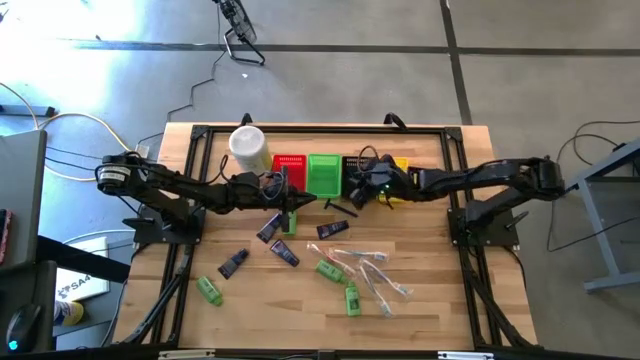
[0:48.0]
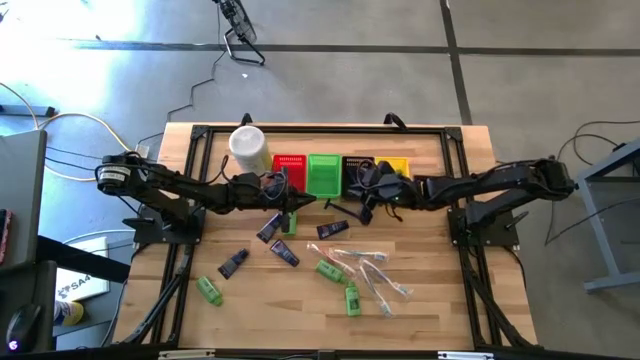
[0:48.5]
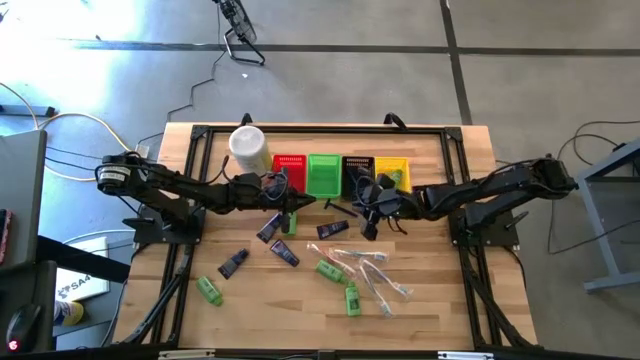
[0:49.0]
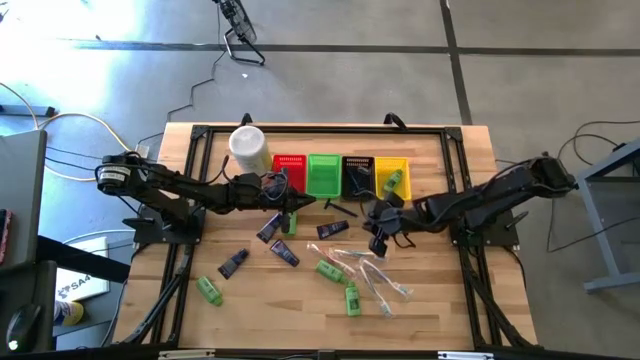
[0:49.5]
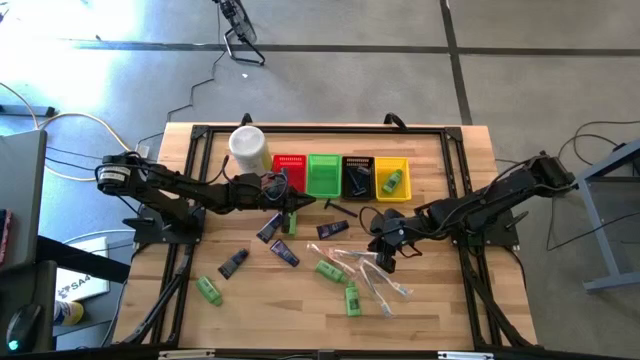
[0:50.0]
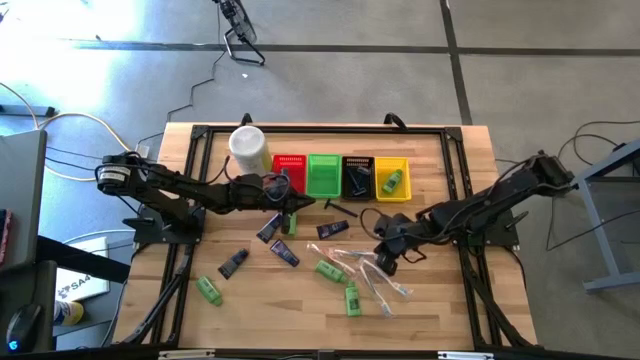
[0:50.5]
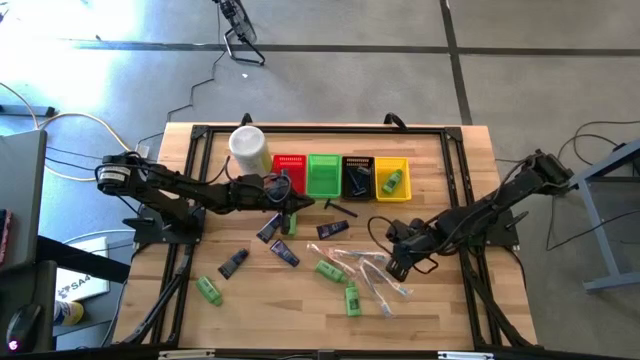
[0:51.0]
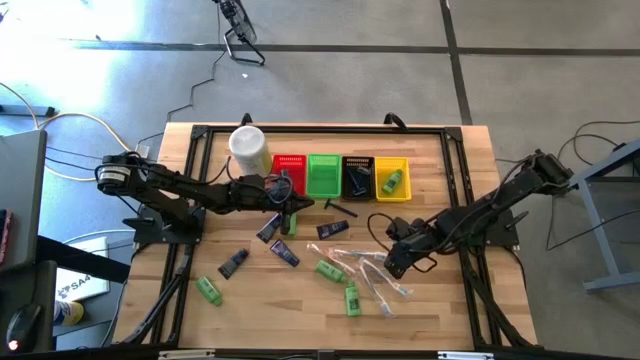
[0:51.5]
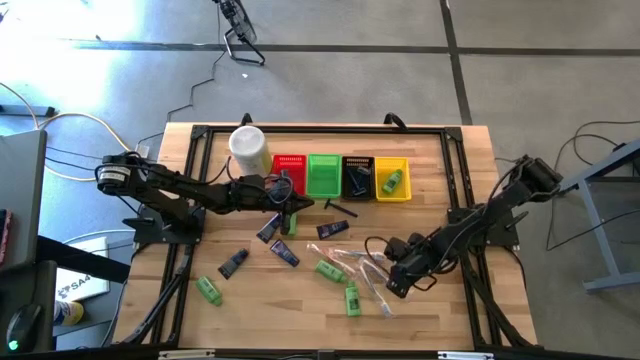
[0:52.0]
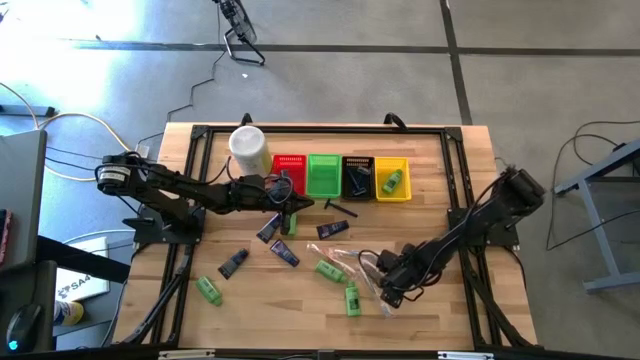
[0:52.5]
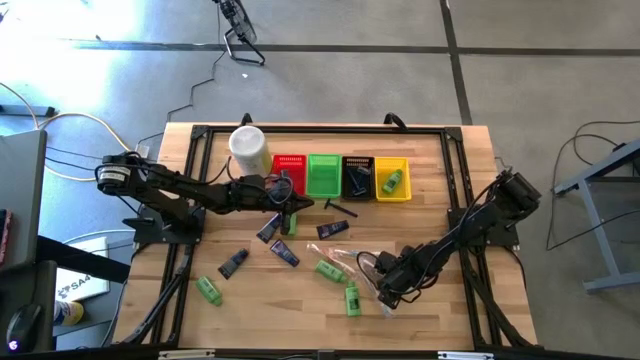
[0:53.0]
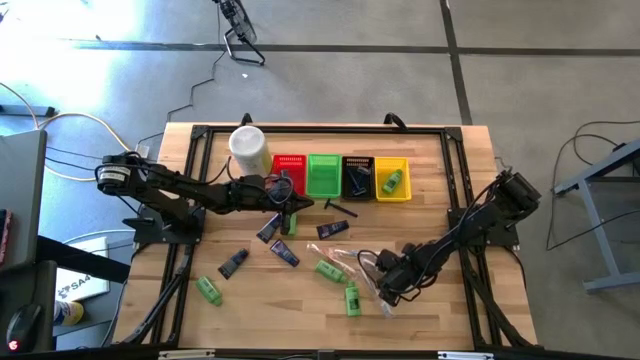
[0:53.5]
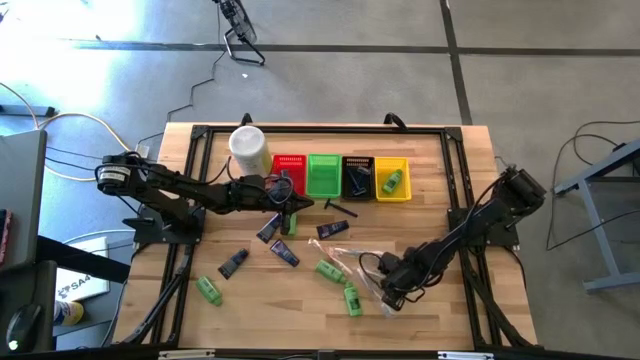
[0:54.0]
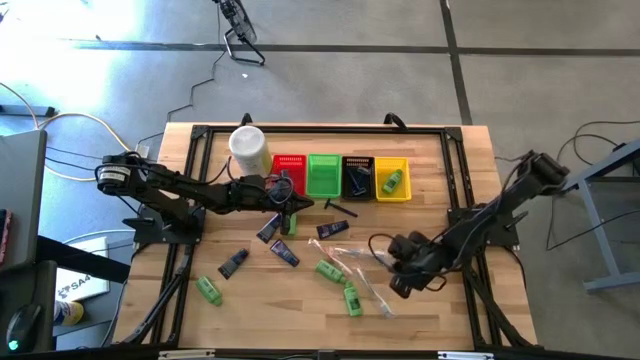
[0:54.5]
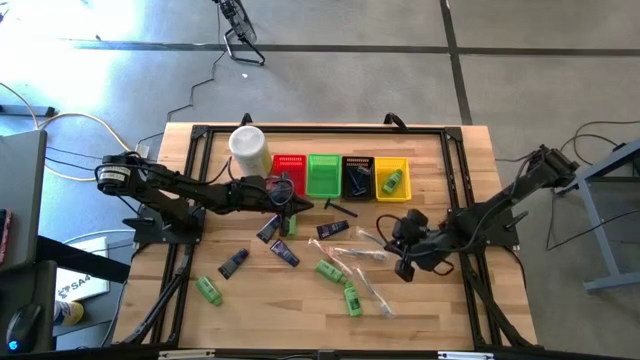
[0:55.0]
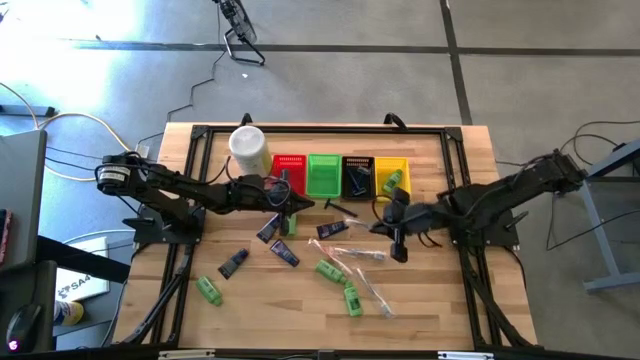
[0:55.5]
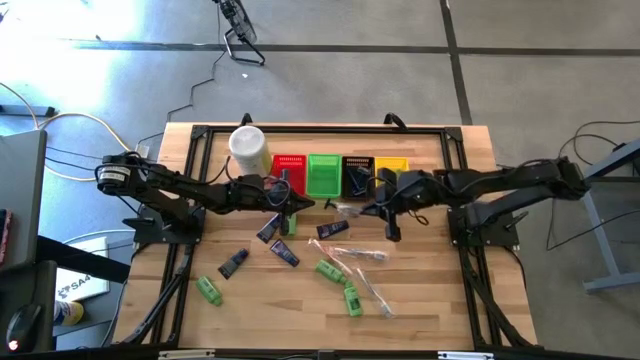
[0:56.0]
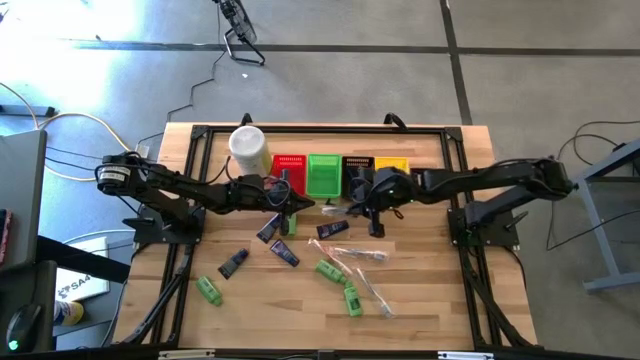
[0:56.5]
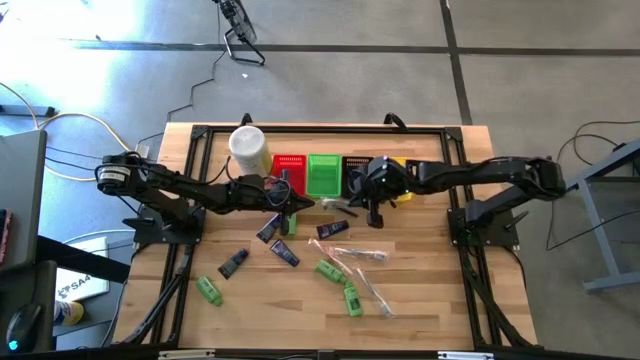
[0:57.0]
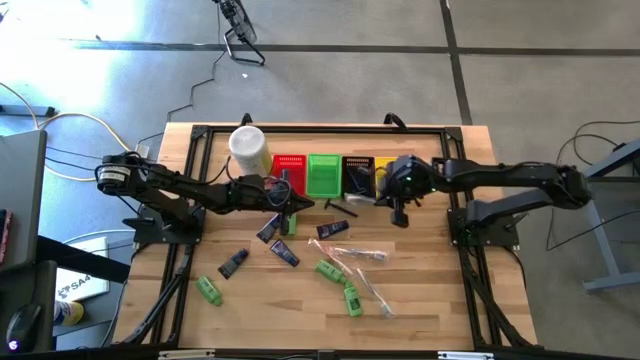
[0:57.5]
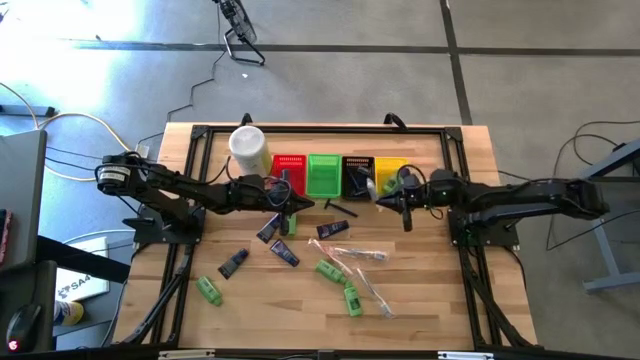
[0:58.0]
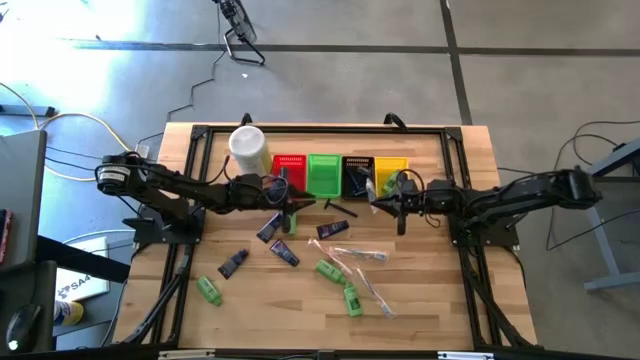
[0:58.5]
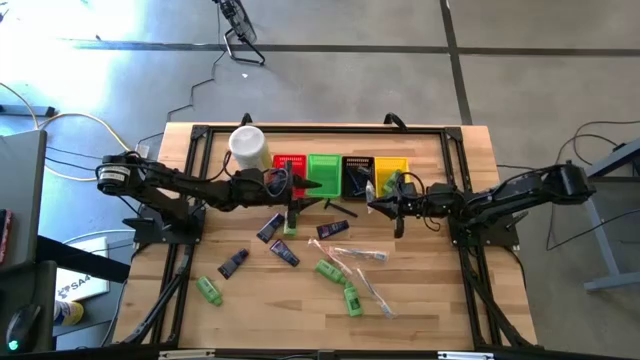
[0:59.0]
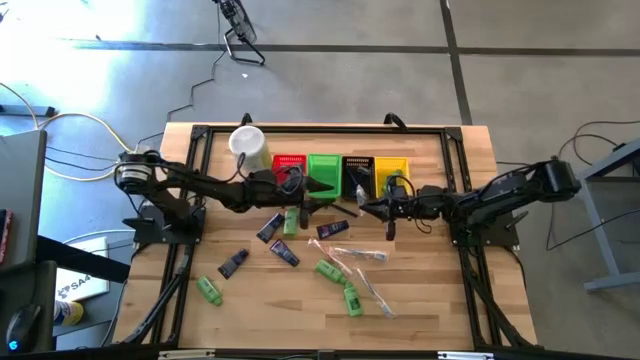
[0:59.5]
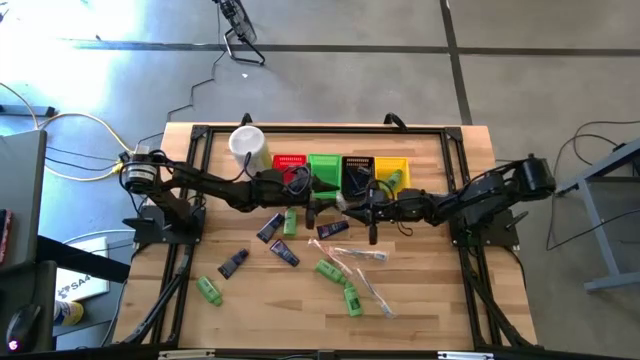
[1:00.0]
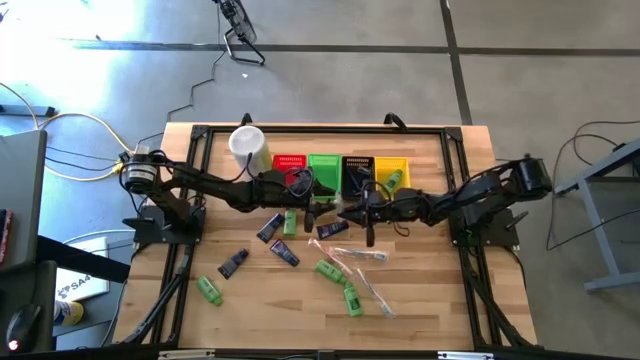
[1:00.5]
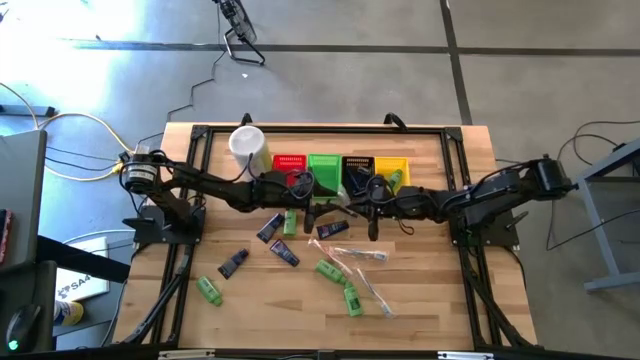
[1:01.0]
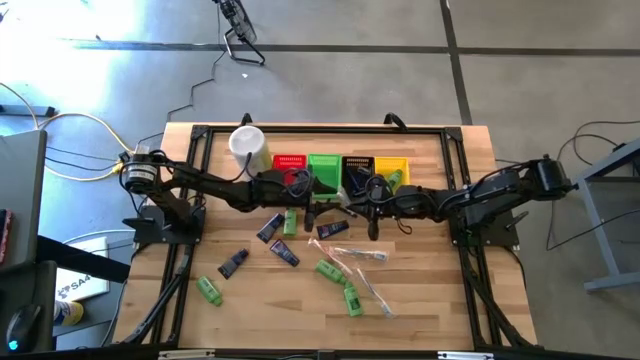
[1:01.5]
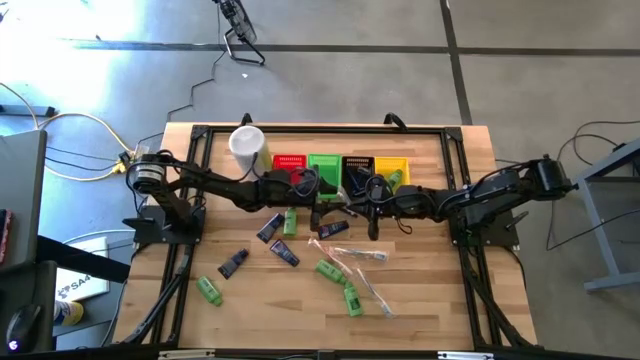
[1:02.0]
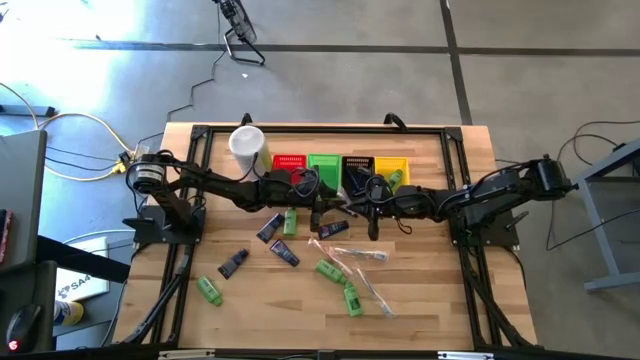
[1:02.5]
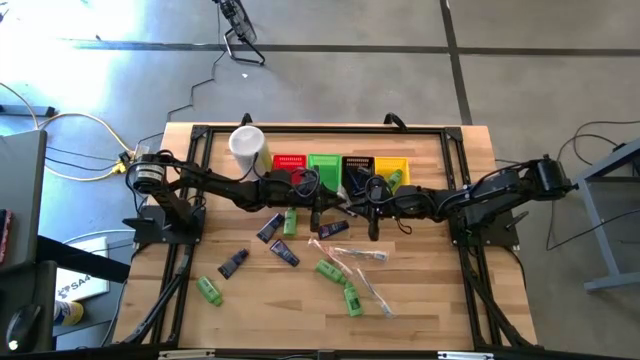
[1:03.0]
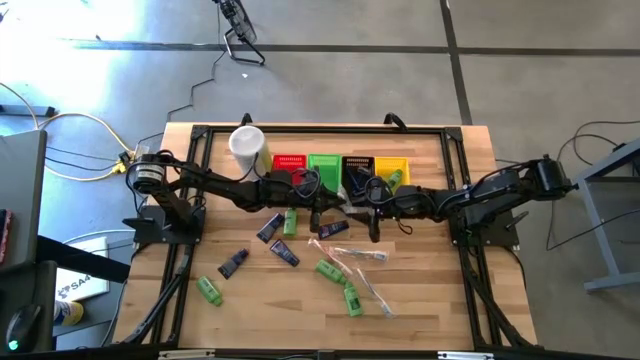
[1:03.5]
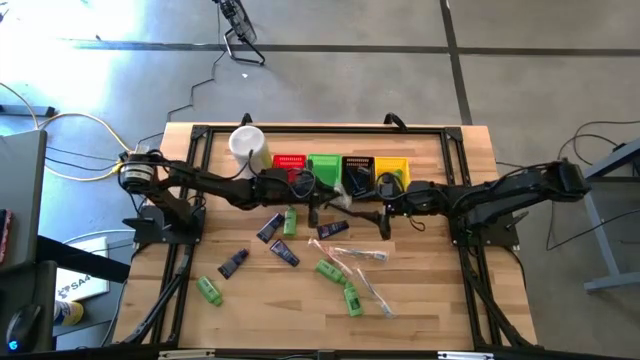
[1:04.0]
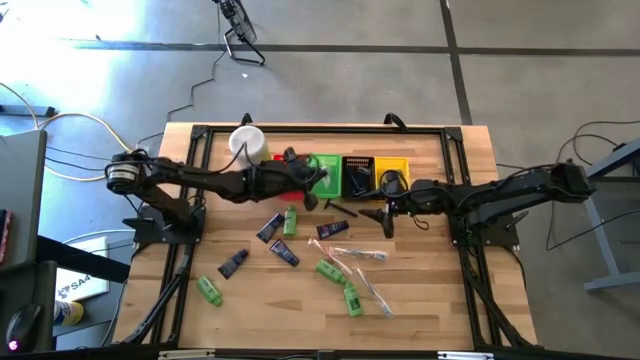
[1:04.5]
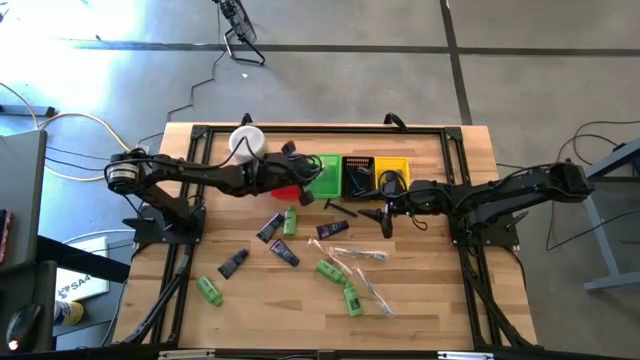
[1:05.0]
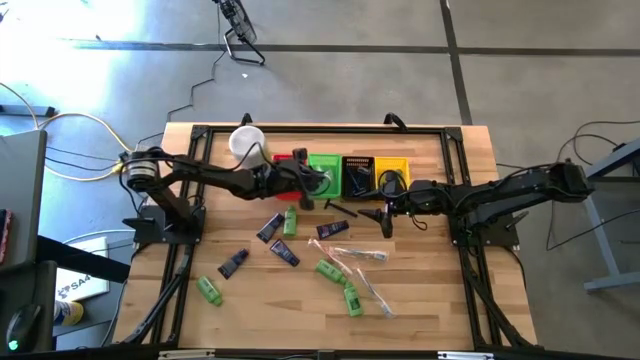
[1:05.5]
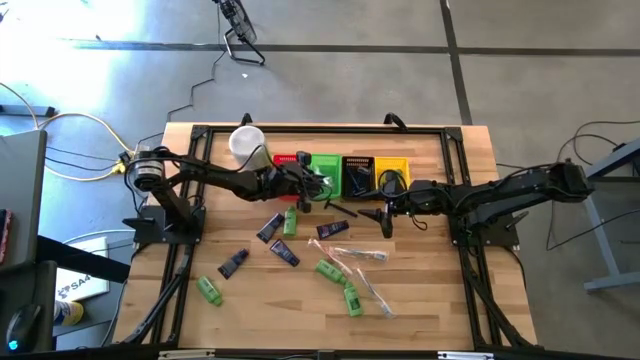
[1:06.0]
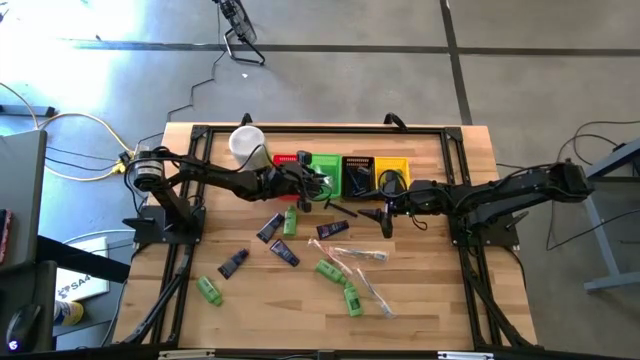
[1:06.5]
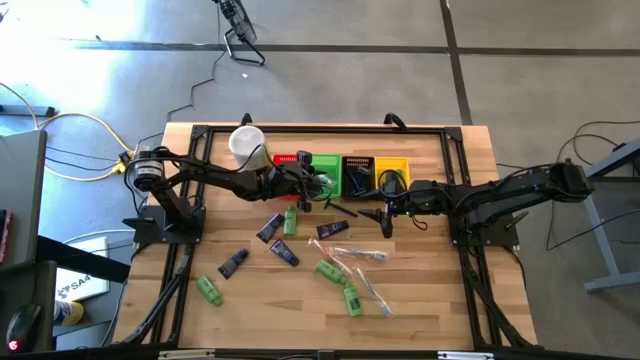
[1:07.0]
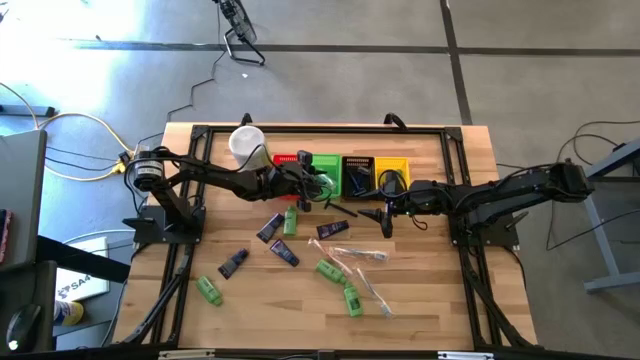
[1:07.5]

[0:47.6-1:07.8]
Task: Pick & Place Travel size toiletries
Put the blue toothbrush into the green bin

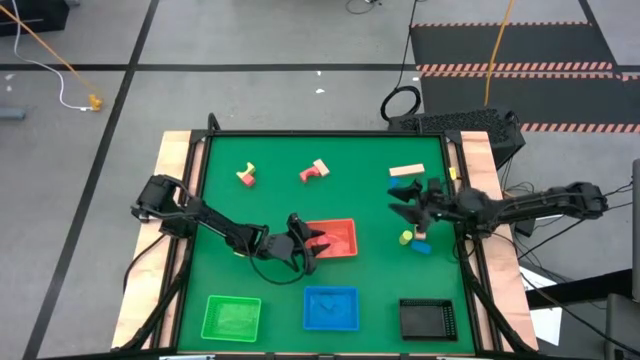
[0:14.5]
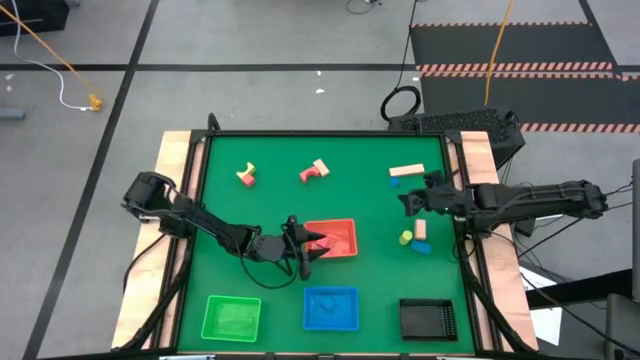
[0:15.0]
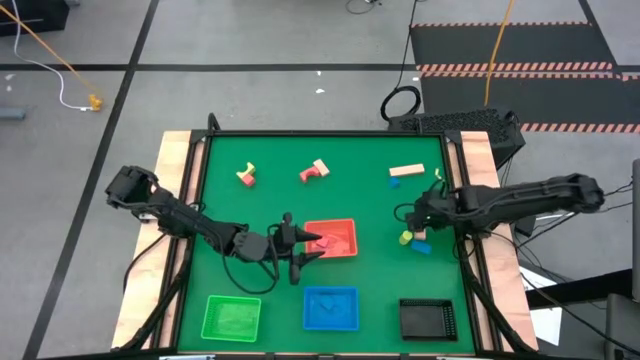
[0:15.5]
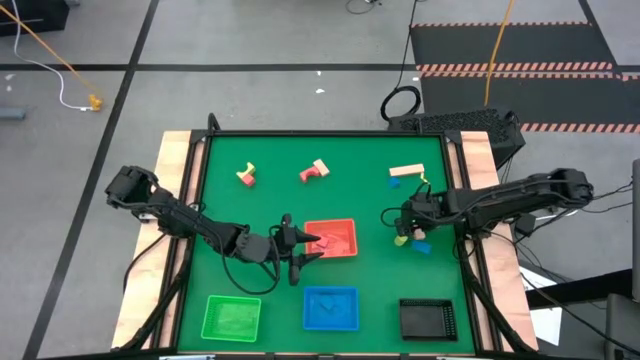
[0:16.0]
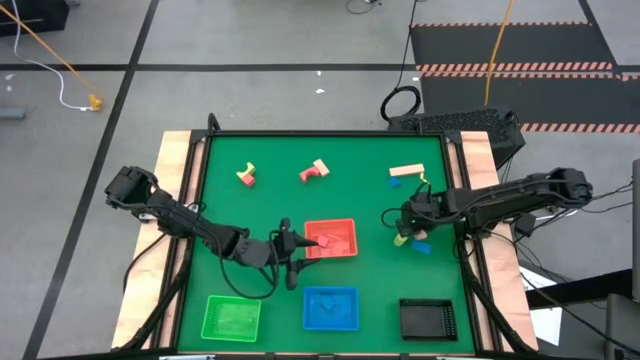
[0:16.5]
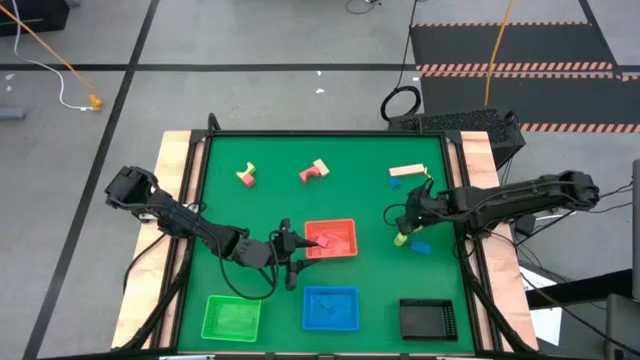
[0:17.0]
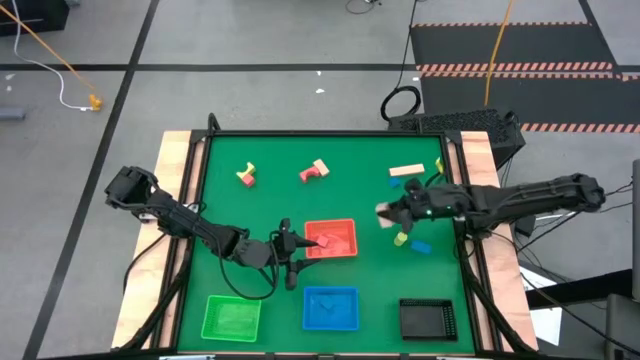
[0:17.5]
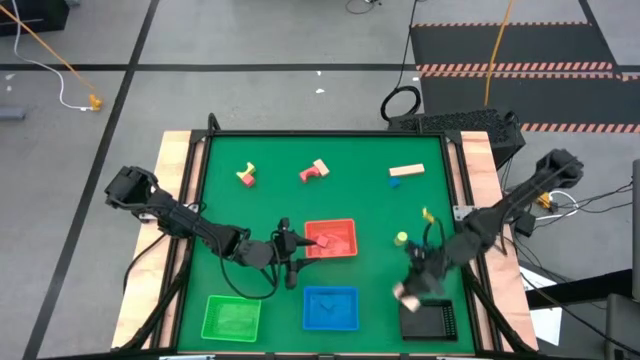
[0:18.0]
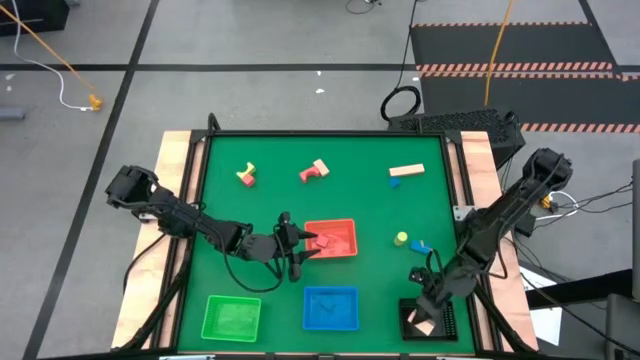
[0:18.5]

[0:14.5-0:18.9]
Task: Sort & place blocks by color
Put the bottom right brown block into the black bin
